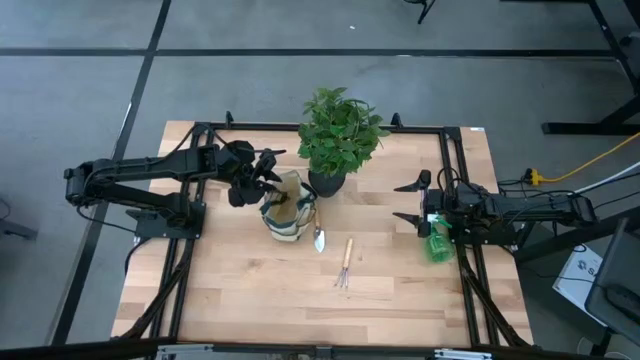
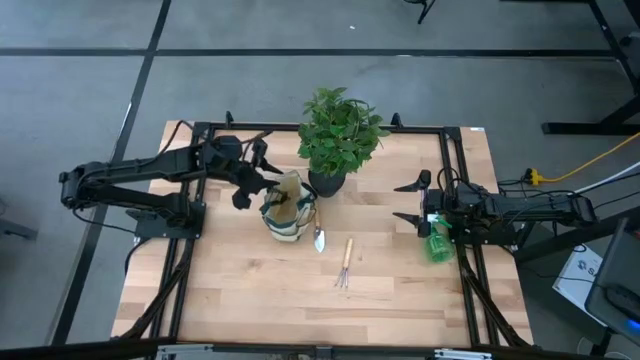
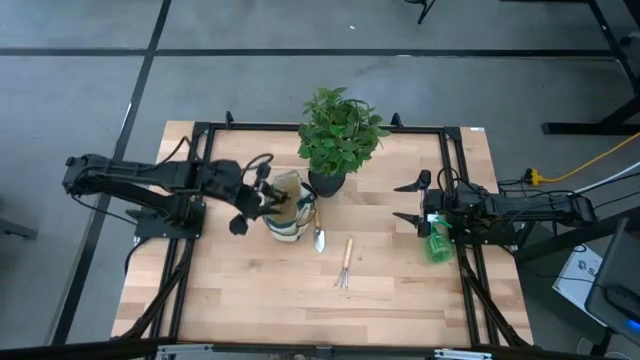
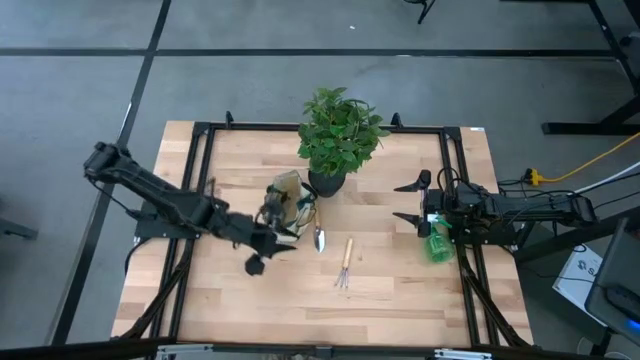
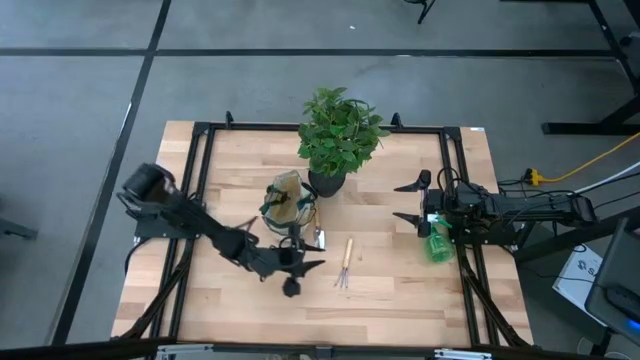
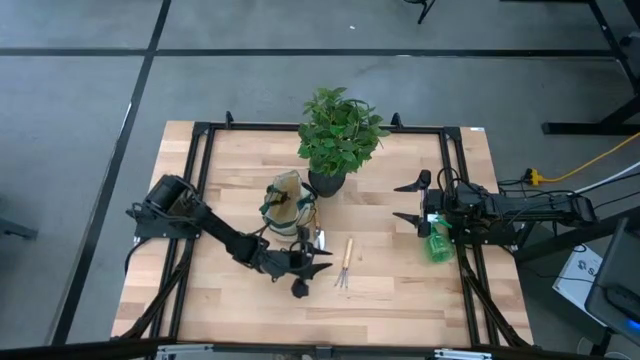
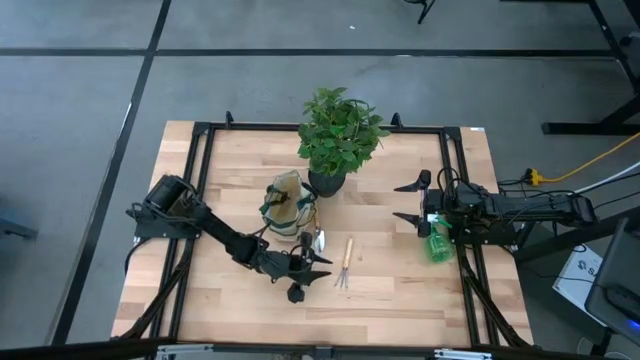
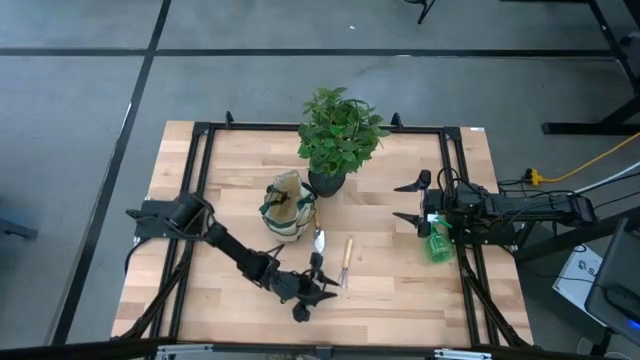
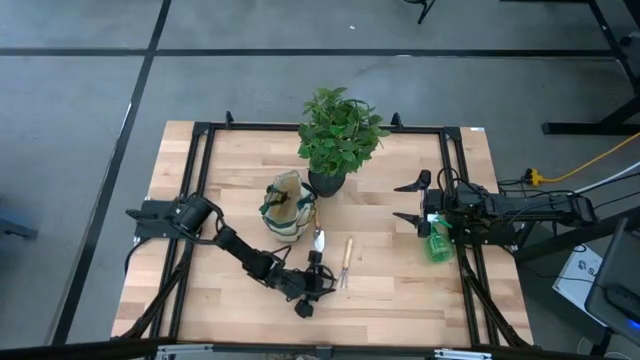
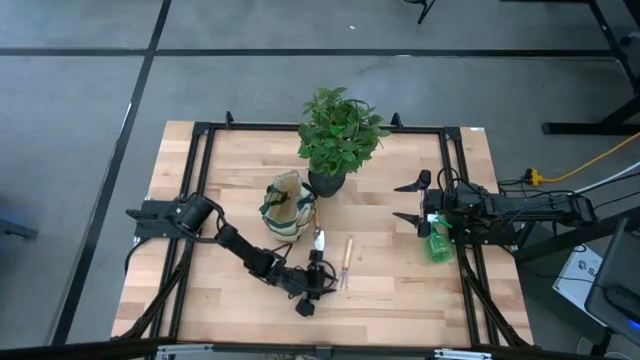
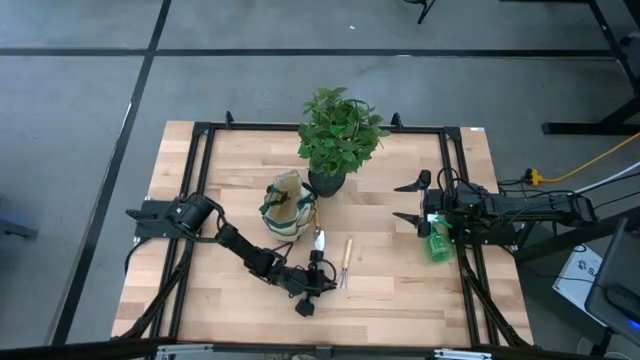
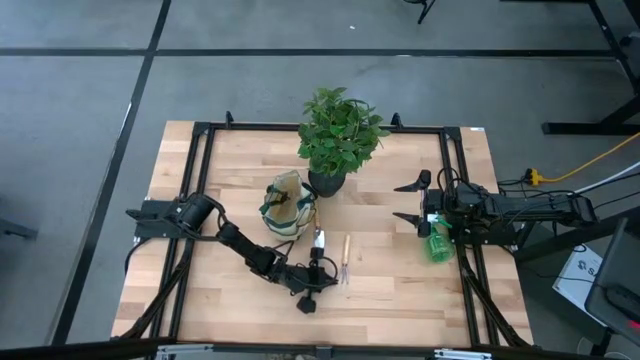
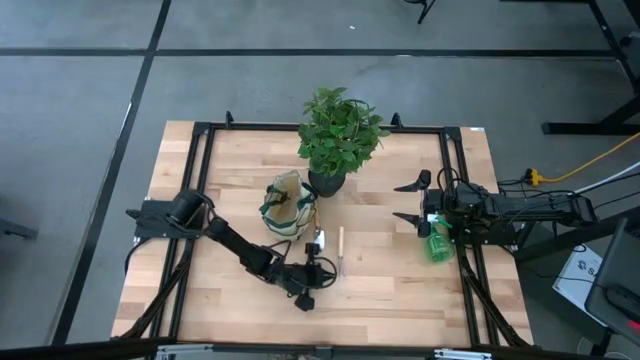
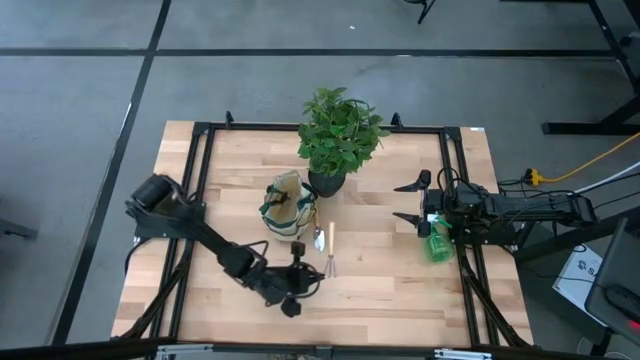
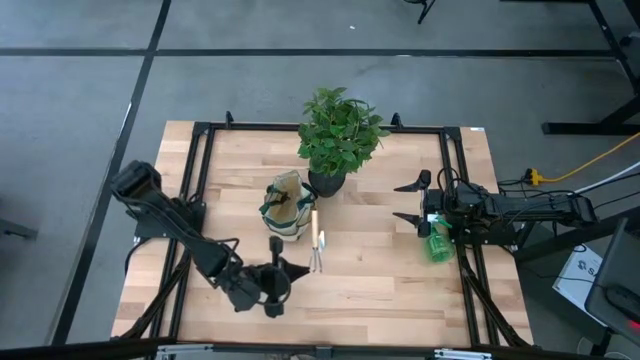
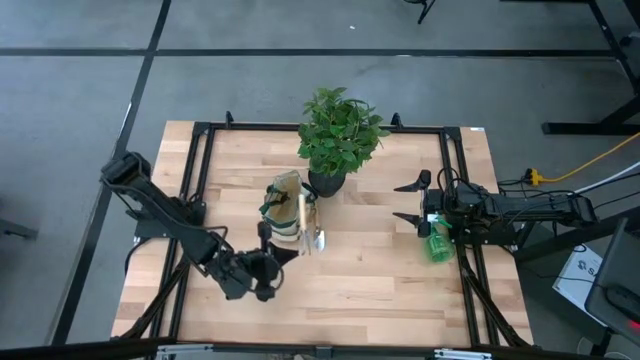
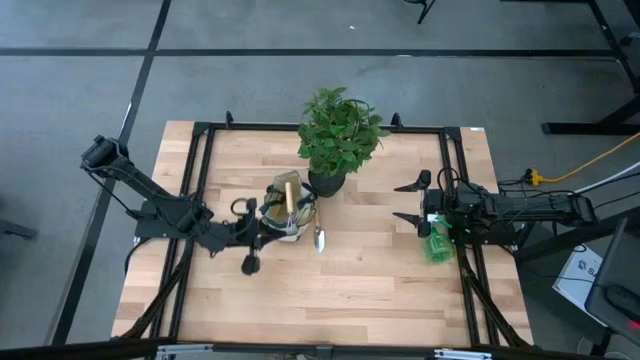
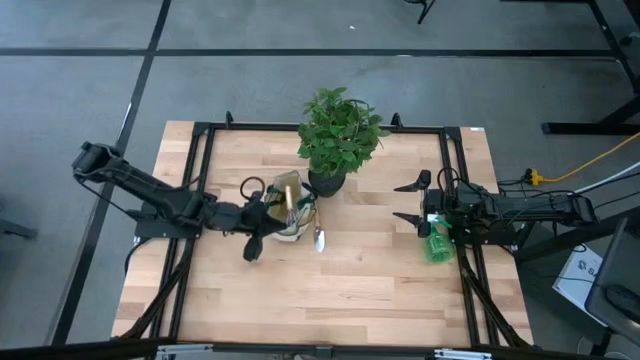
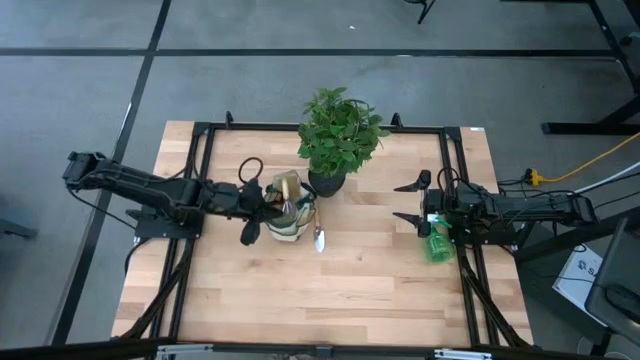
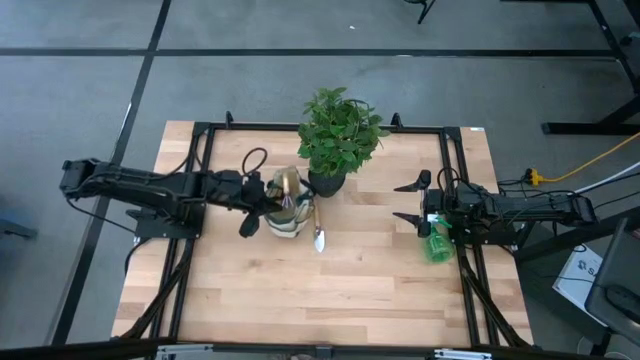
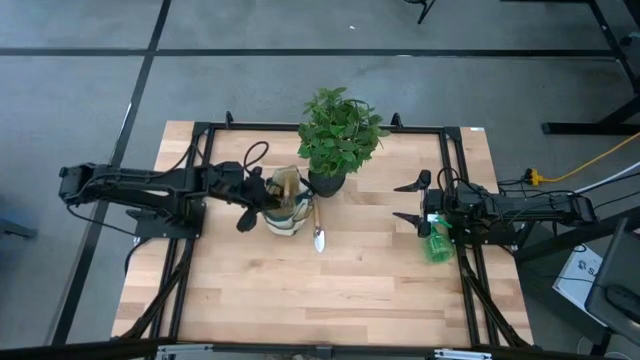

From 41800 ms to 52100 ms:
Task: Pick & Place Garden tools in Gardening bag
Put the brown hand rake into the white bag

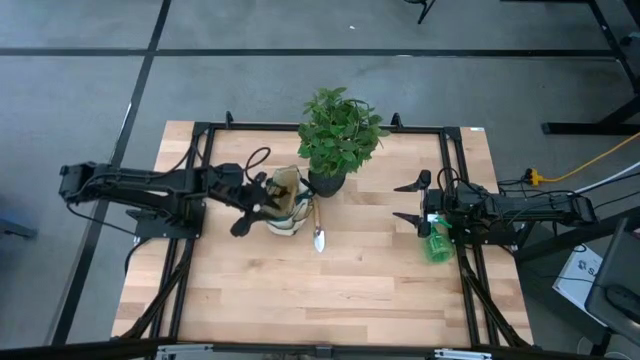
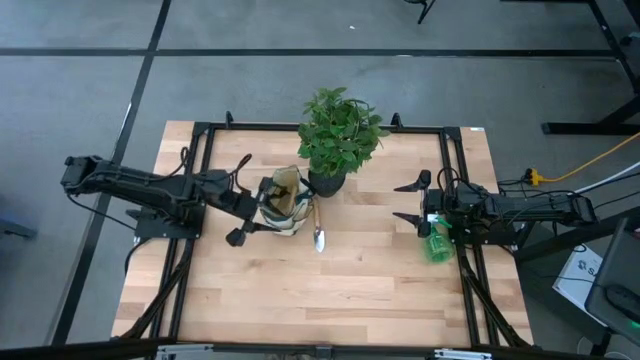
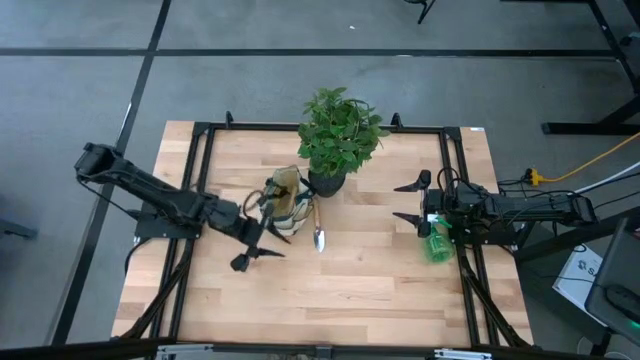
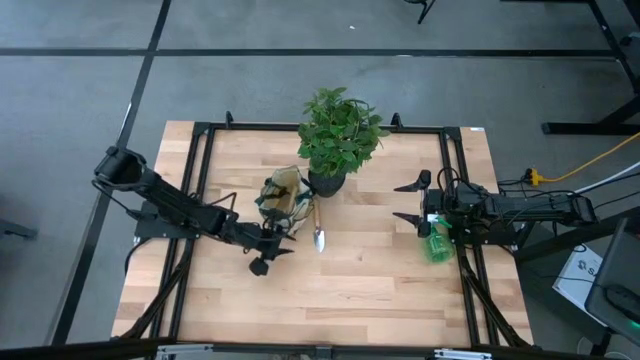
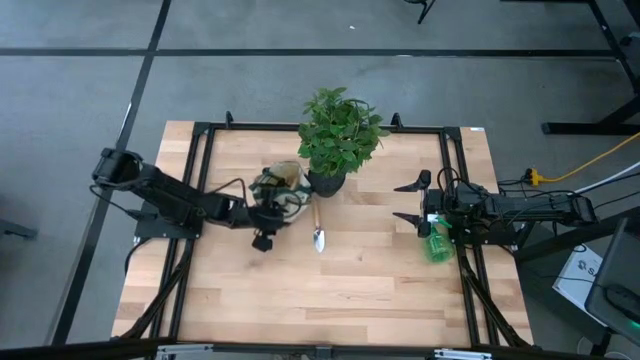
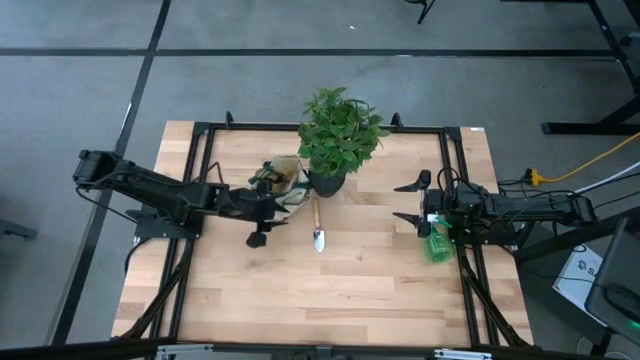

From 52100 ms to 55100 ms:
Adjust the white bag on the table

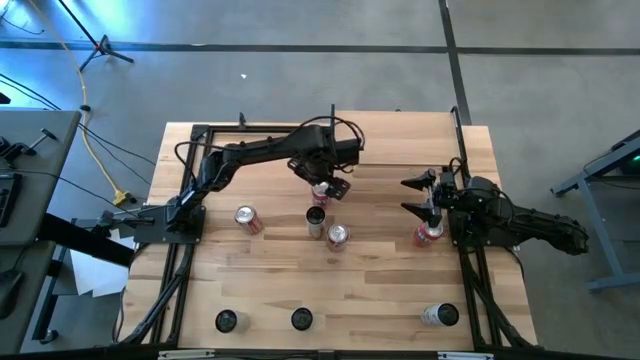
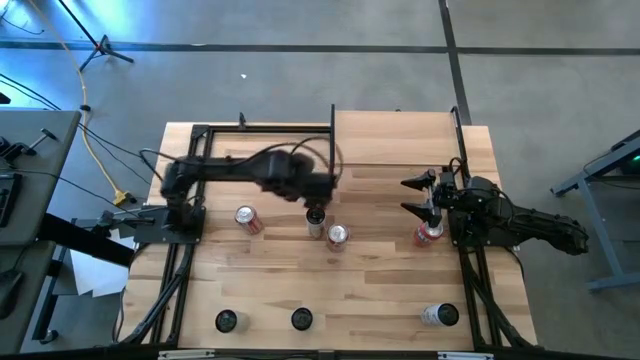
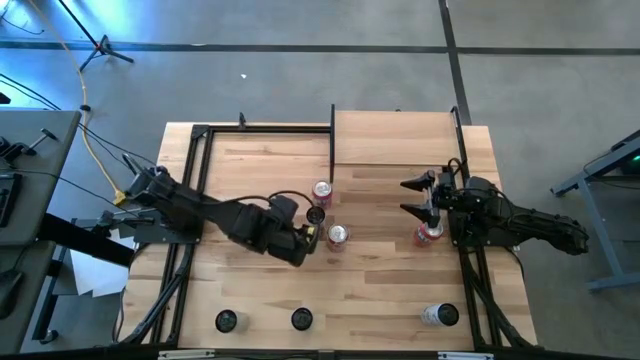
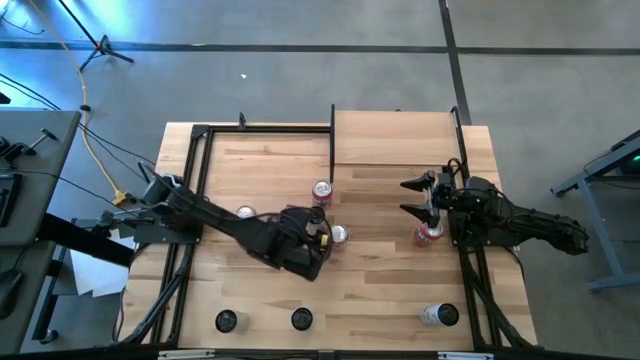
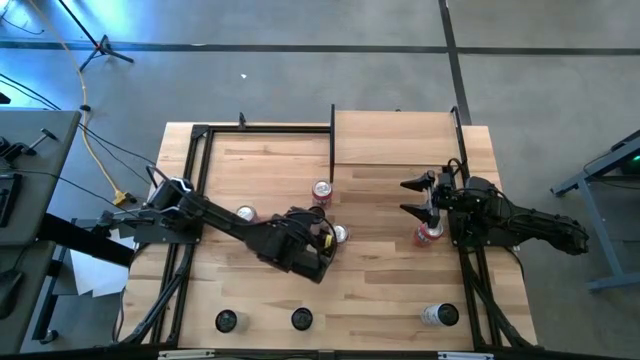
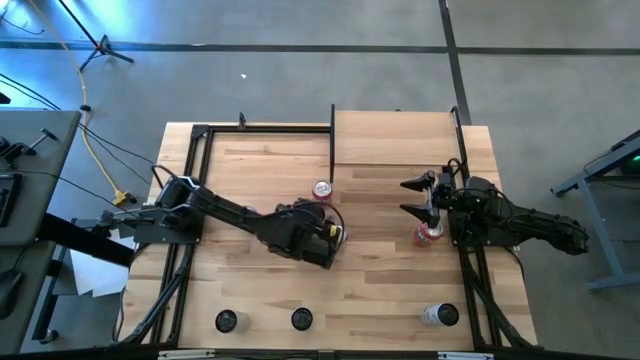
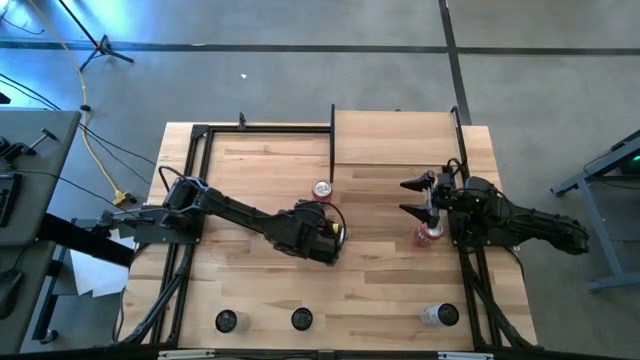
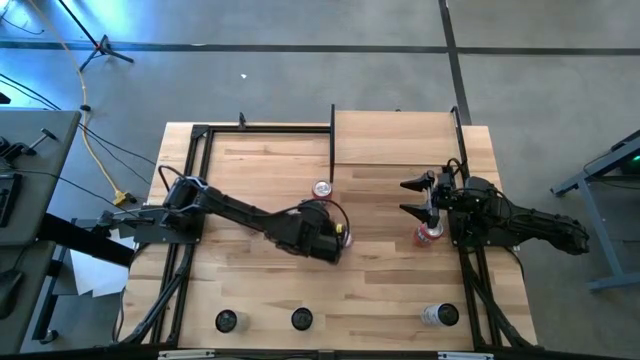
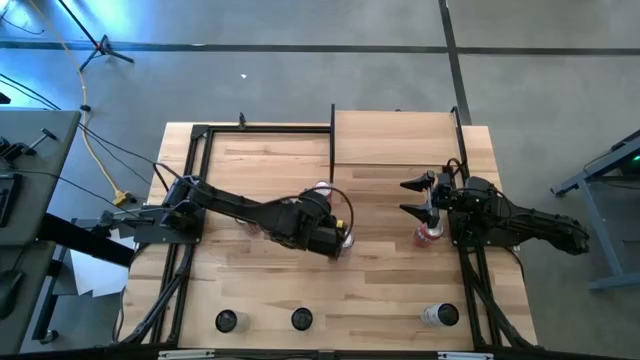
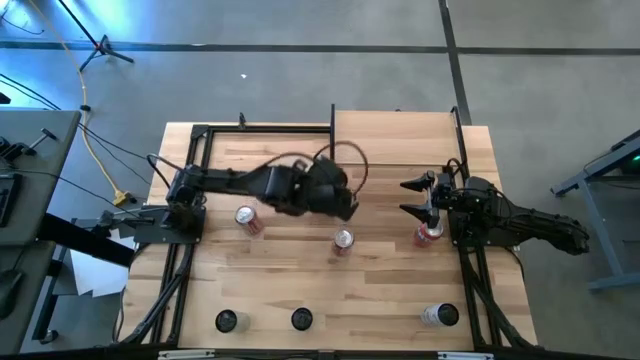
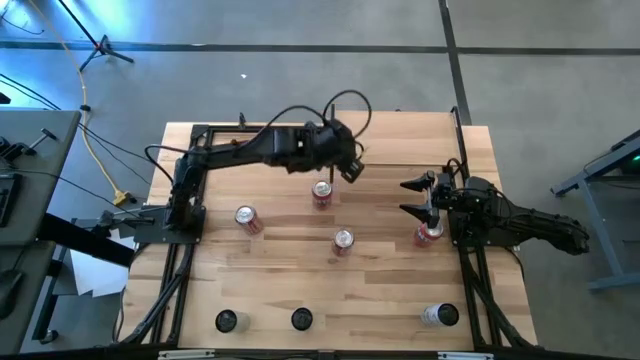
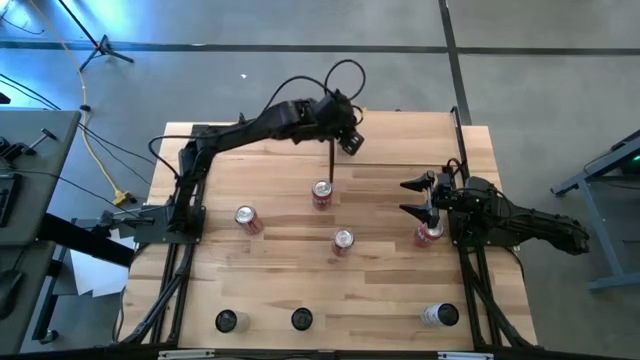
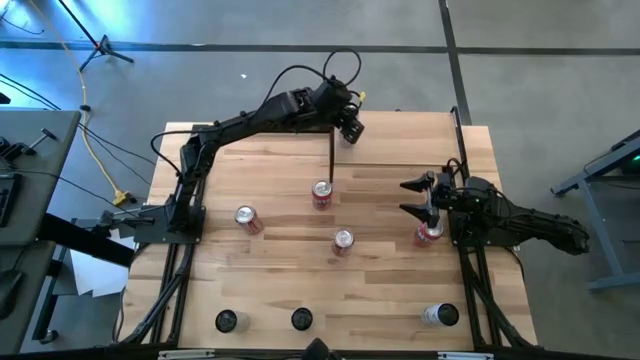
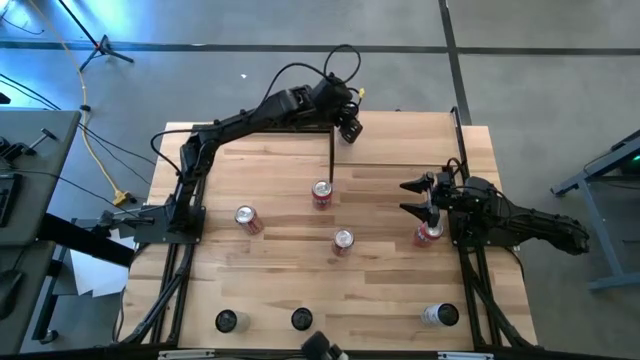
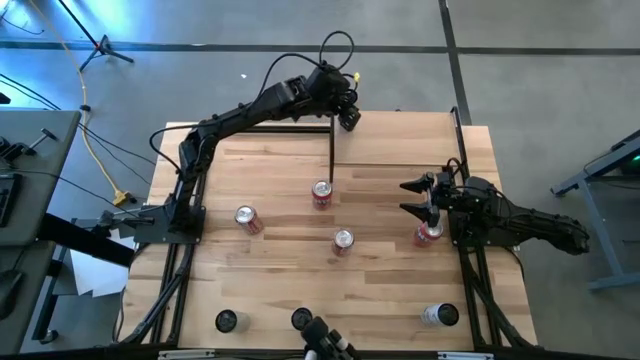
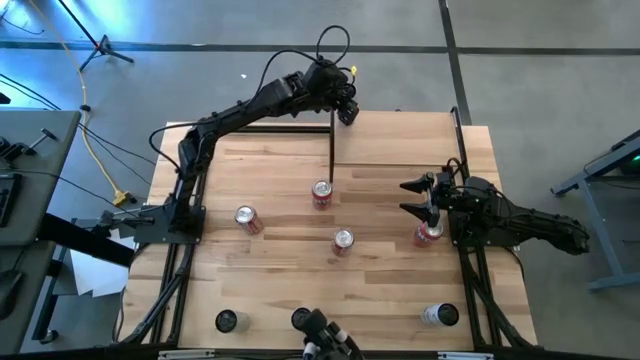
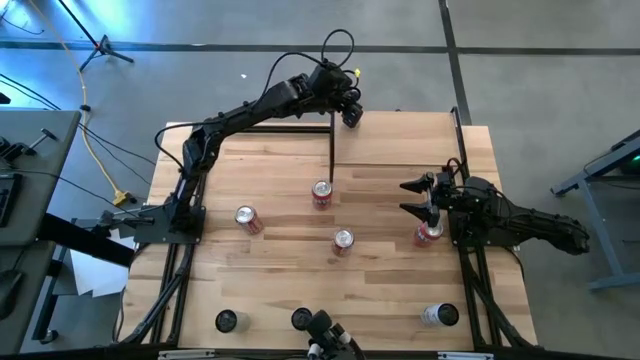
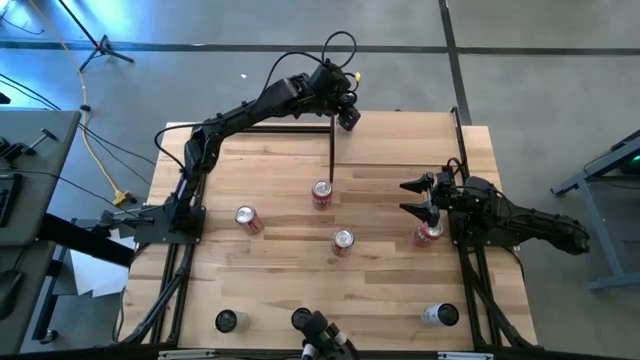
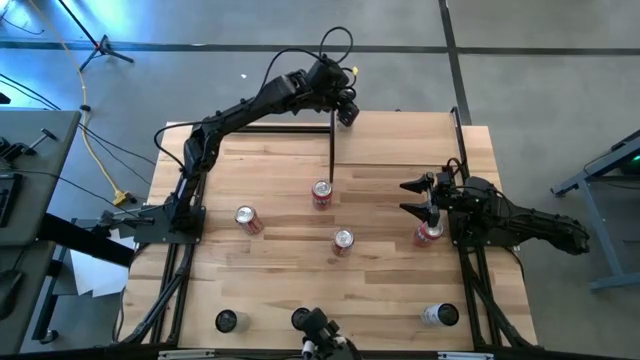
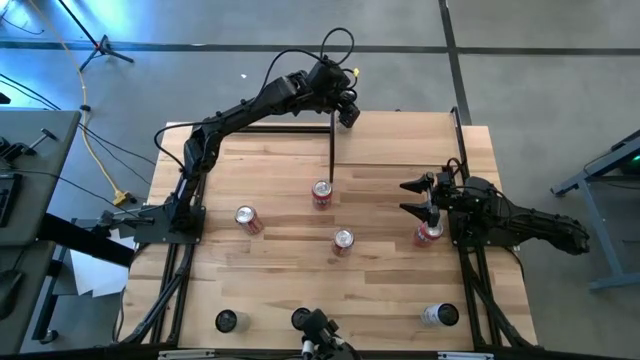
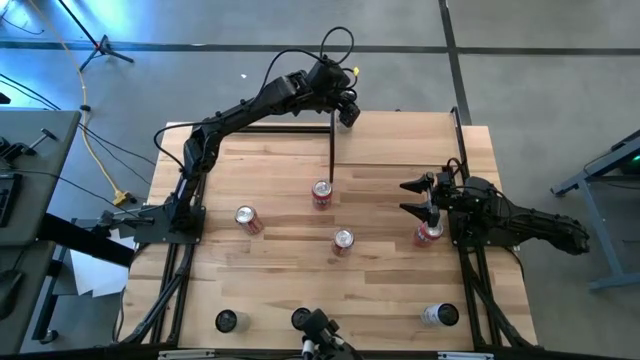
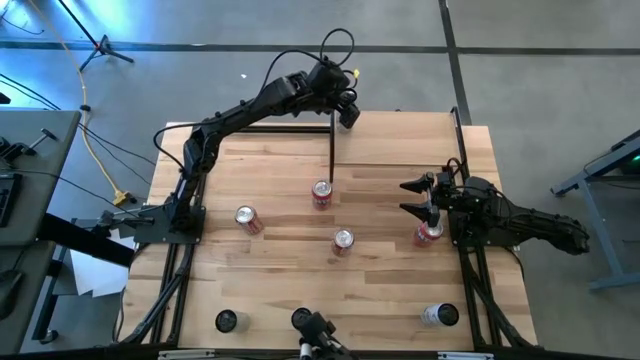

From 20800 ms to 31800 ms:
Task: Place canned beverage on shelf
Put the top the white yellow soda can on the shelf
